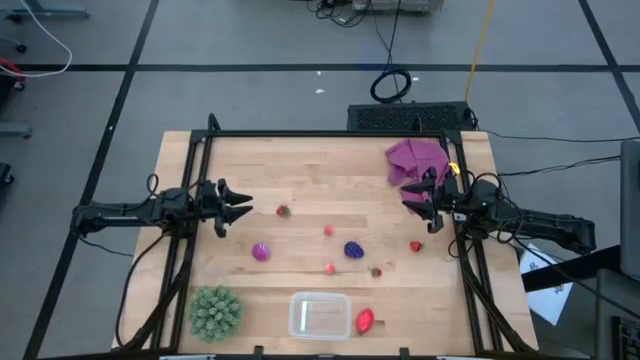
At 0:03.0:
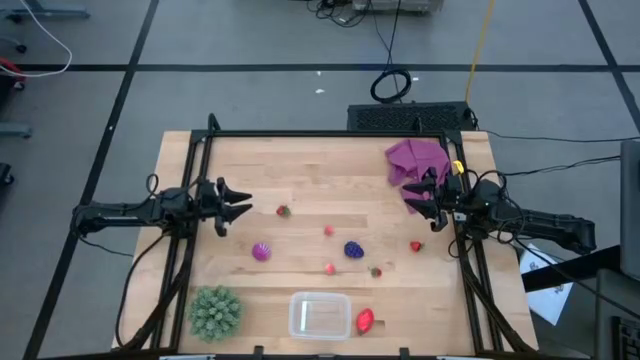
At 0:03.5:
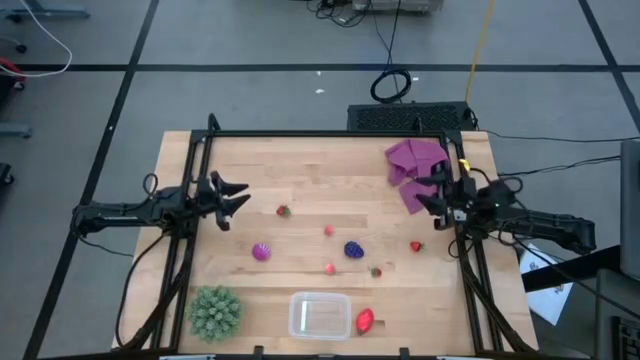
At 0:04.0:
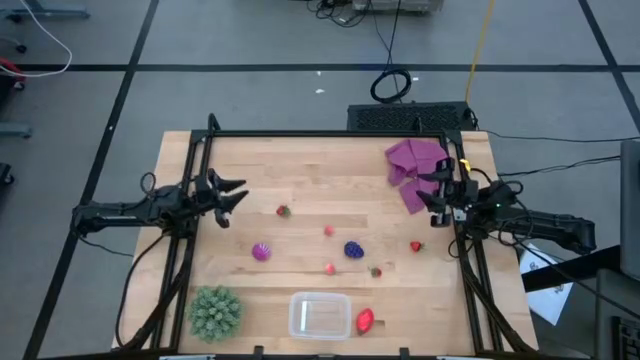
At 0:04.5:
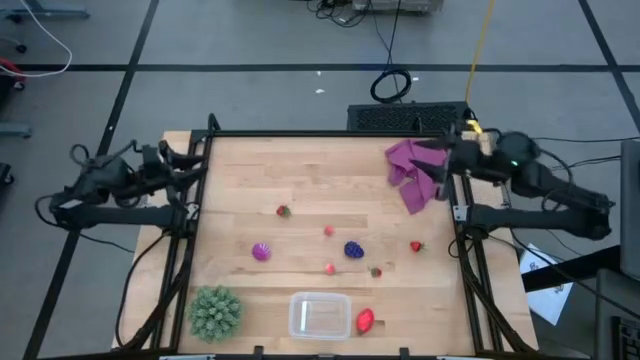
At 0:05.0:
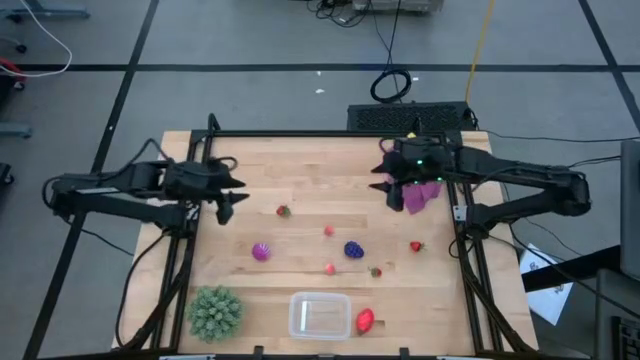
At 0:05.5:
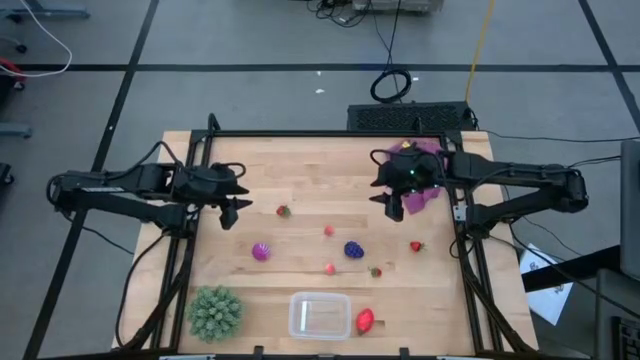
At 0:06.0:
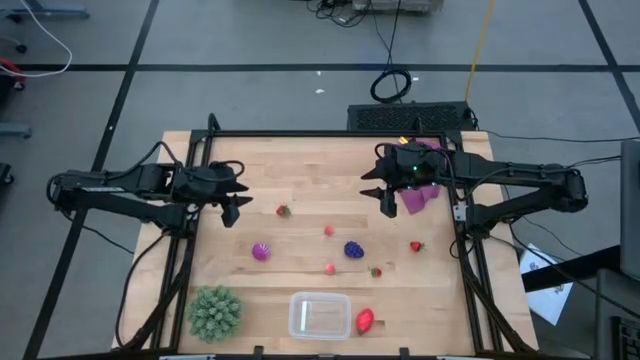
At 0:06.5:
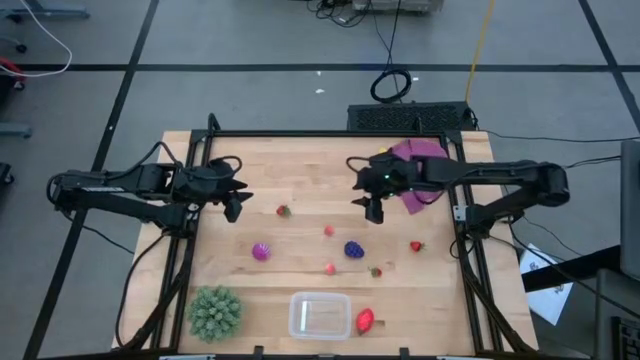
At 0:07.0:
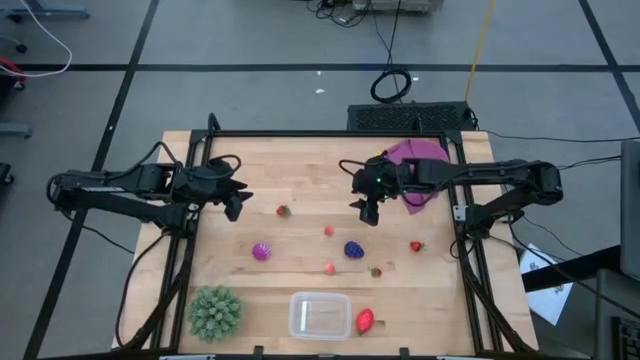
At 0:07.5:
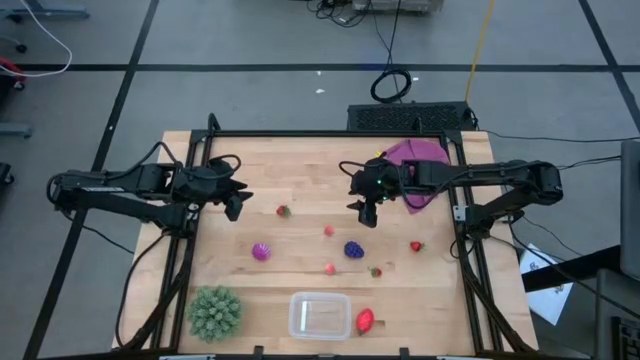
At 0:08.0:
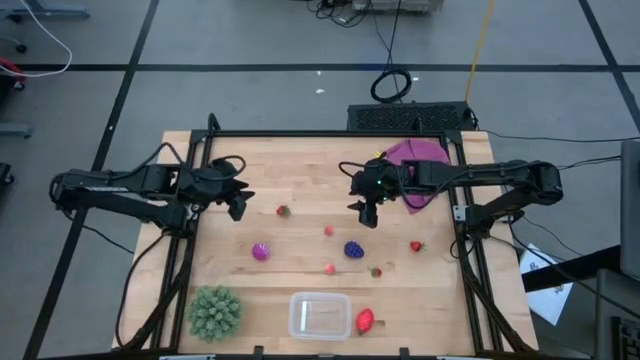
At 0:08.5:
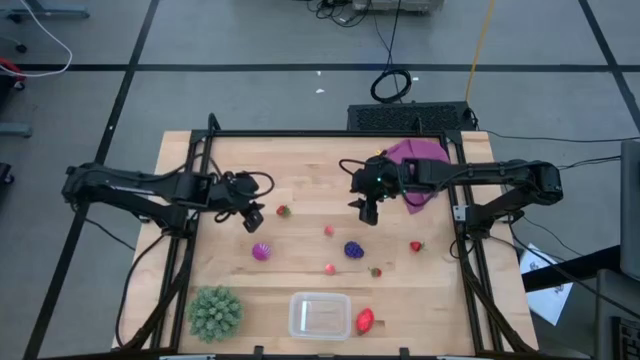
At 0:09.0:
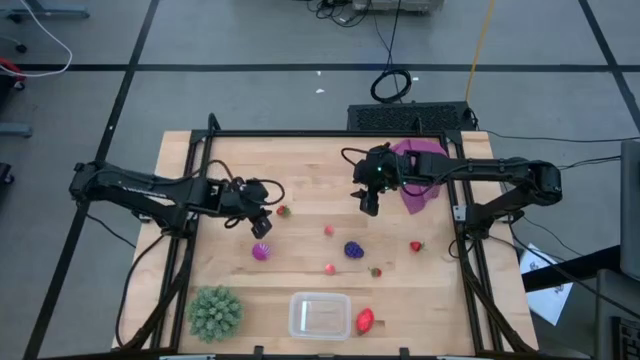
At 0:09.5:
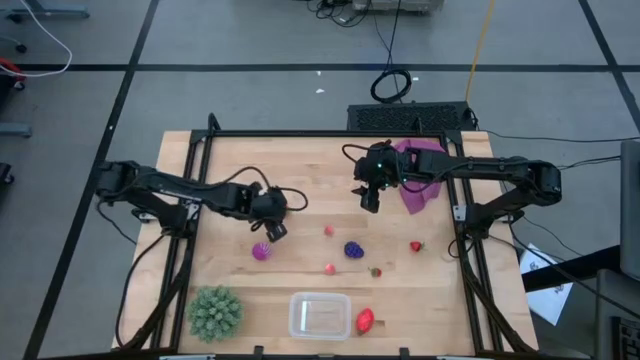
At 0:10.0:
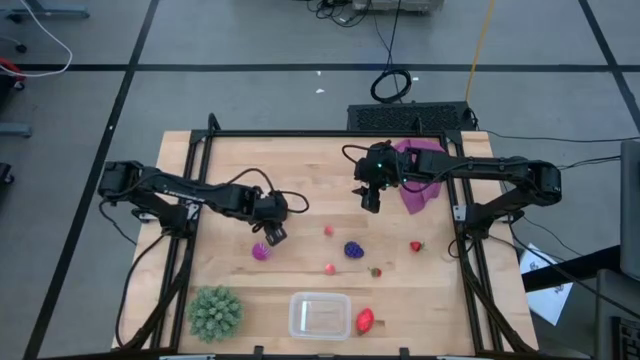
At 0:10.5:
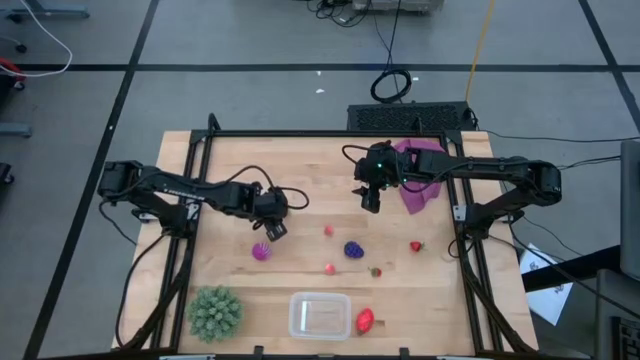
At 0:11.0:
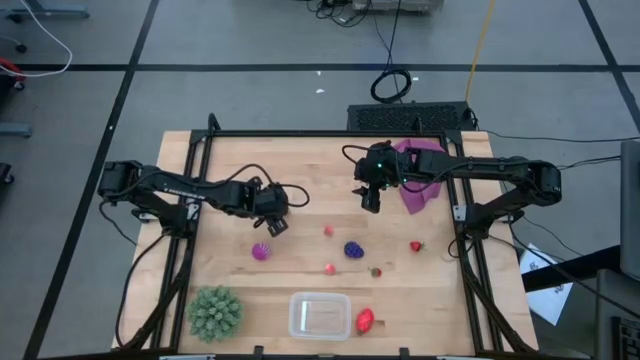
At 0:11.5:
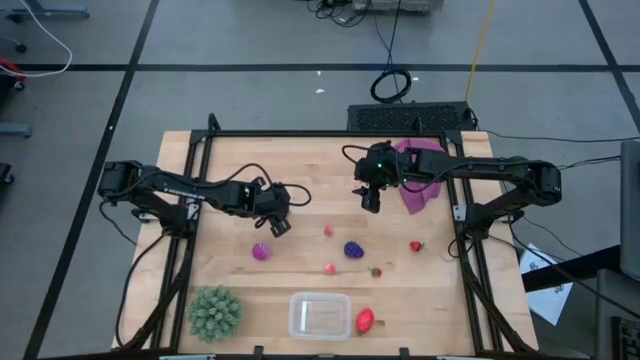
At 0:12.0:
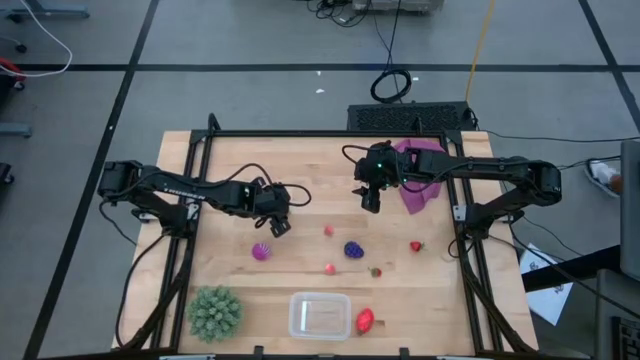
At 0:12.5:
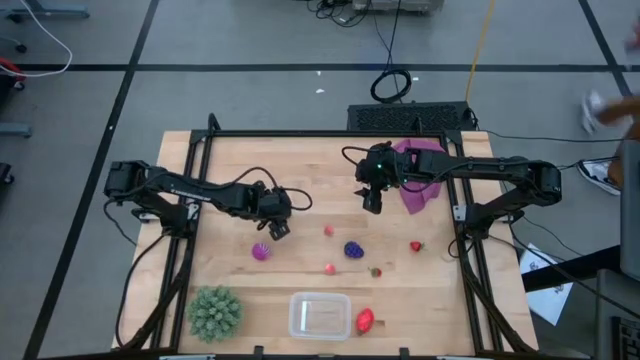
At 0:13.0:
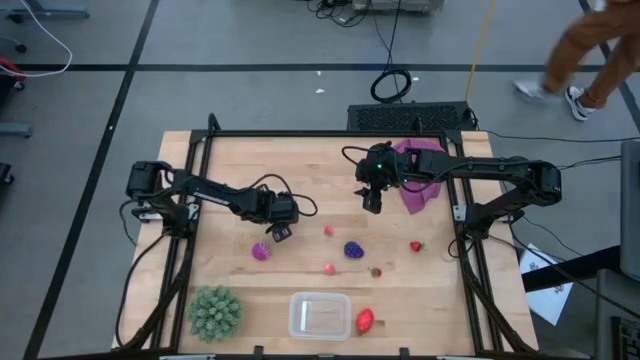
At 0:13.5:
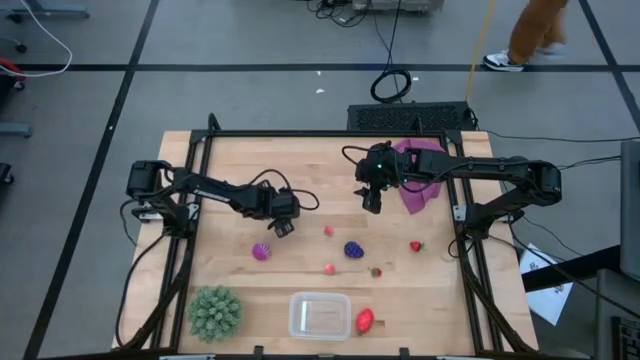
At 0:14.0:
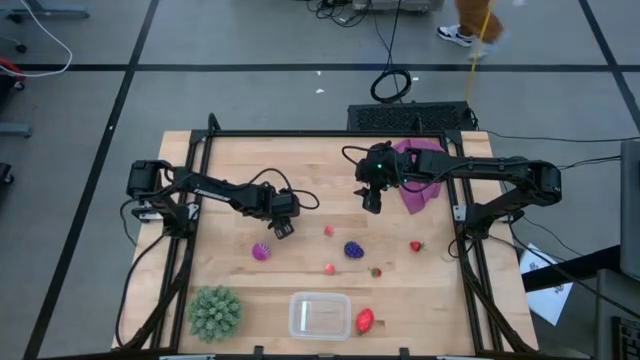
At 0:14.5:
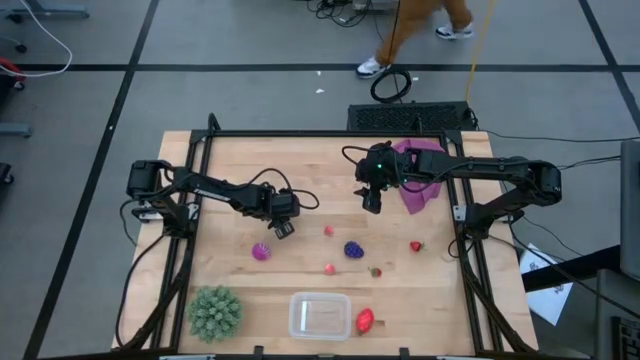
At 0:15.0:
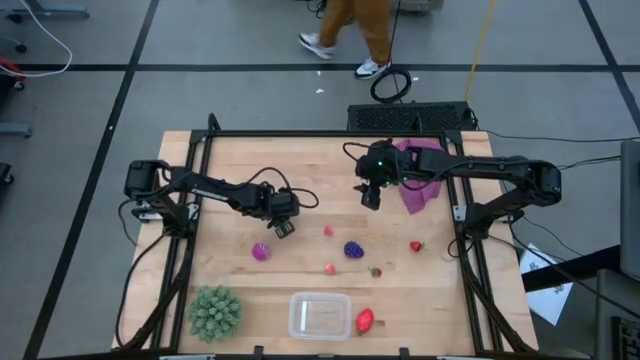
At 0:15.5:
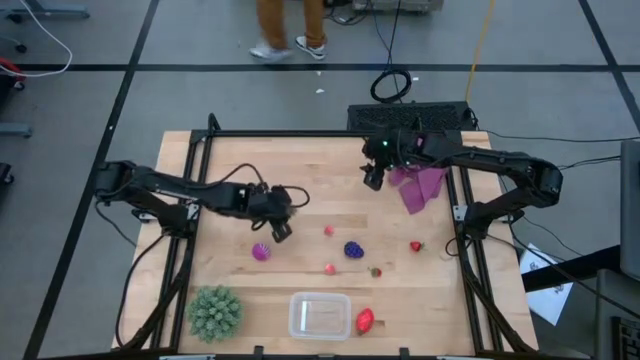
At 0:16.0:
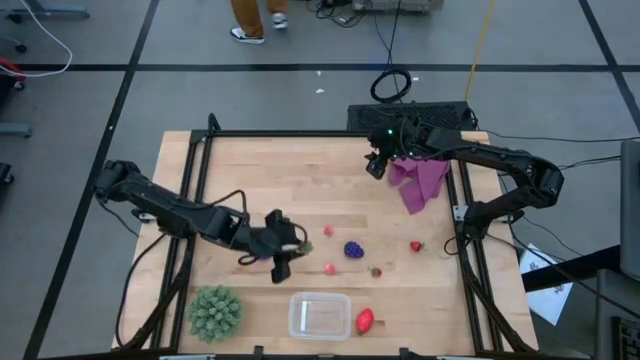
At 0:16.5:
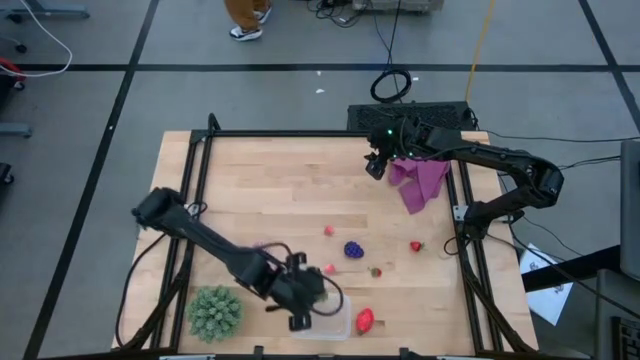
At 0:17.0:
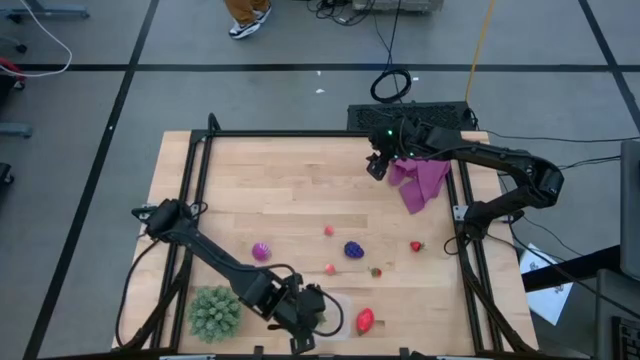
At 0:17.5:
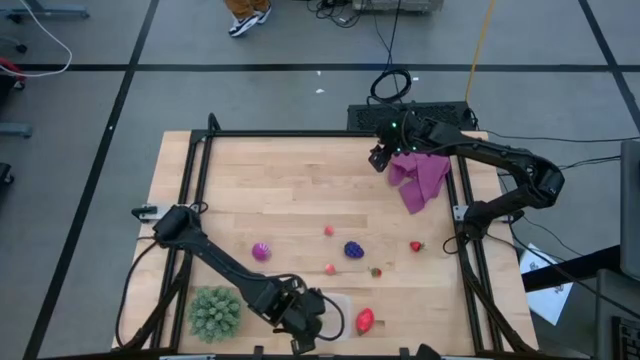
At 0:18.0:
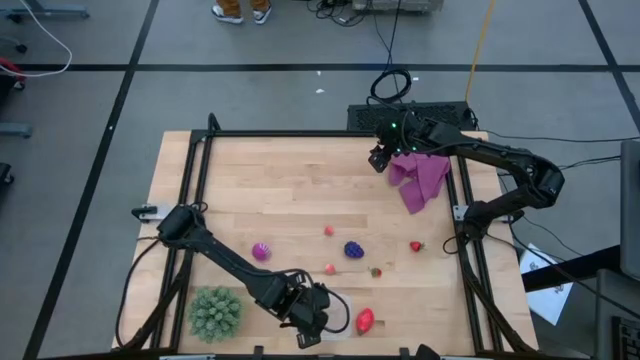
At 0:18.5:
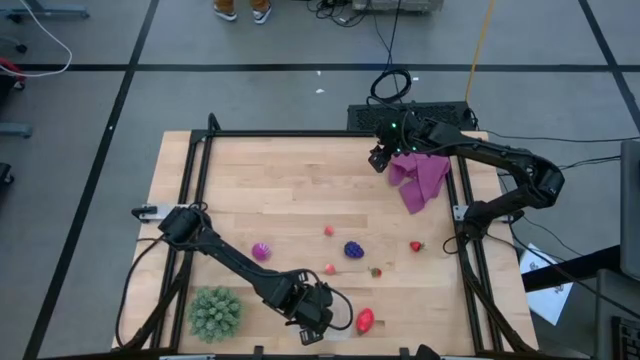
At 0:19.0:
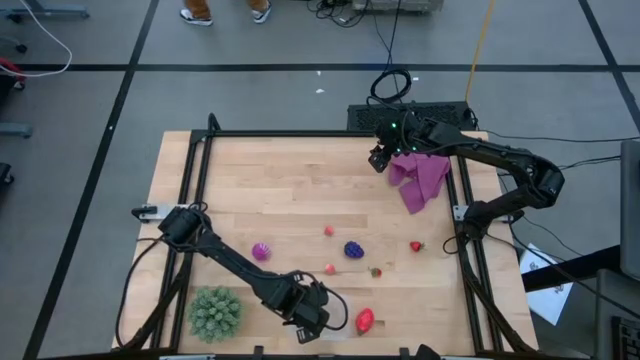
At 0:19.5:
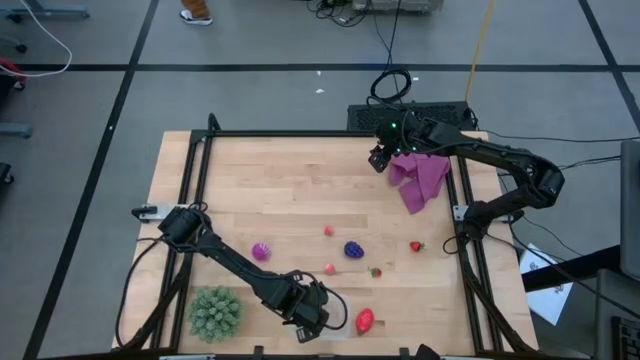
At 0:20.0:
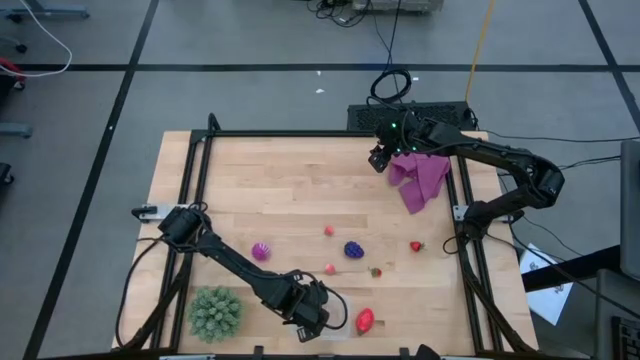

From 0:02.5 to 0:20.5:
Task: Pick and placing Produce into tupperware
Put the left strawberry into the transparent bin
